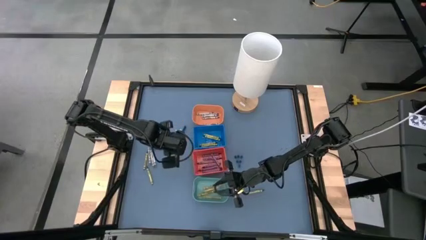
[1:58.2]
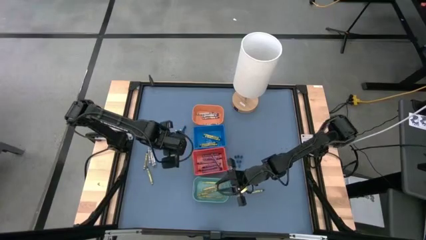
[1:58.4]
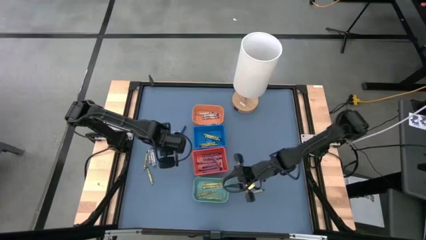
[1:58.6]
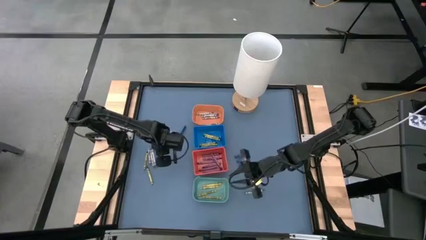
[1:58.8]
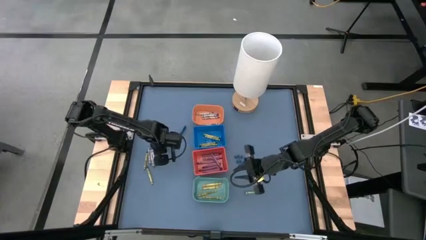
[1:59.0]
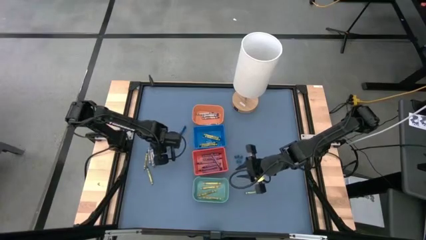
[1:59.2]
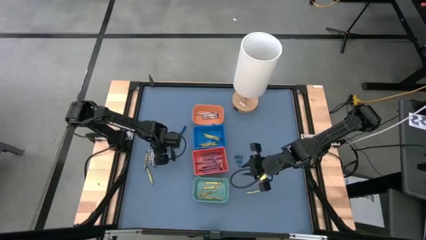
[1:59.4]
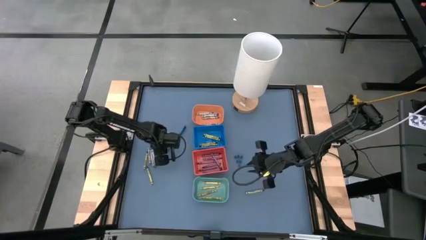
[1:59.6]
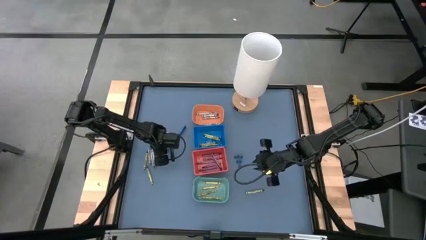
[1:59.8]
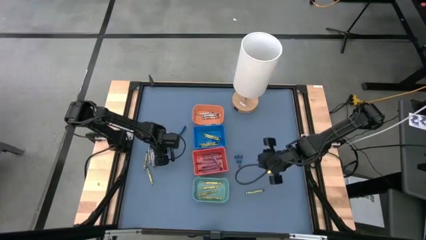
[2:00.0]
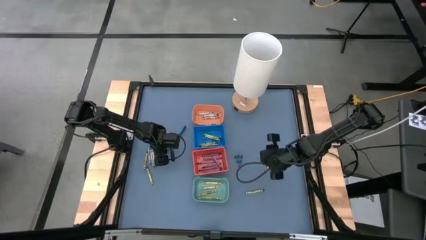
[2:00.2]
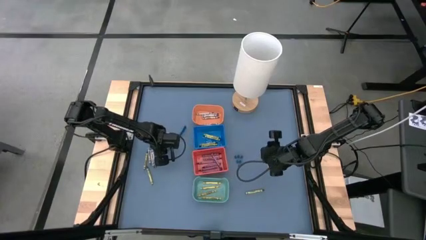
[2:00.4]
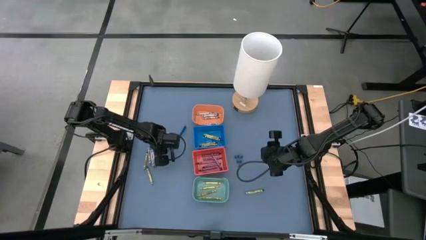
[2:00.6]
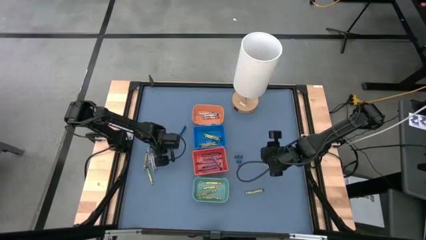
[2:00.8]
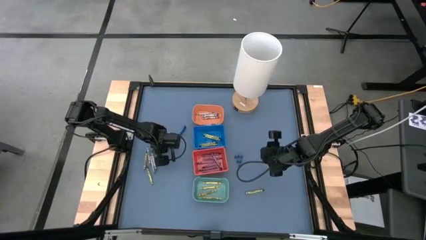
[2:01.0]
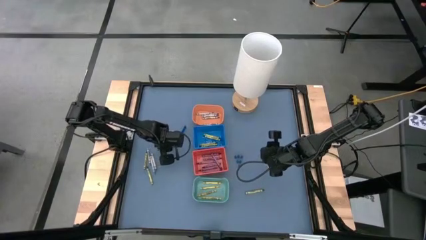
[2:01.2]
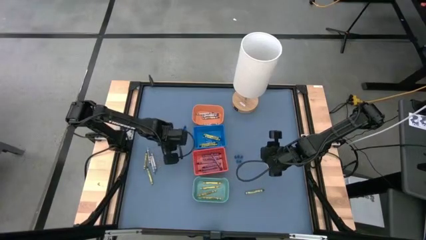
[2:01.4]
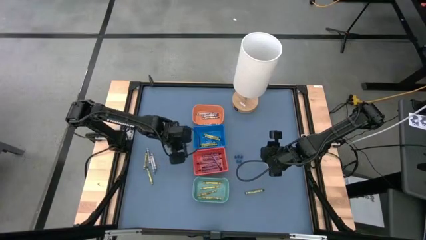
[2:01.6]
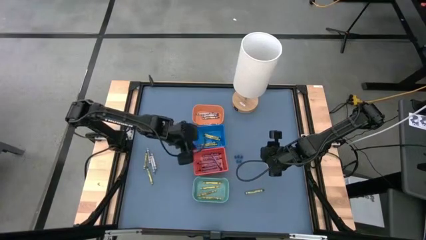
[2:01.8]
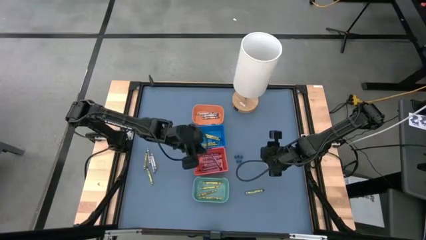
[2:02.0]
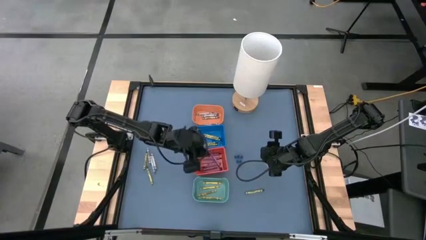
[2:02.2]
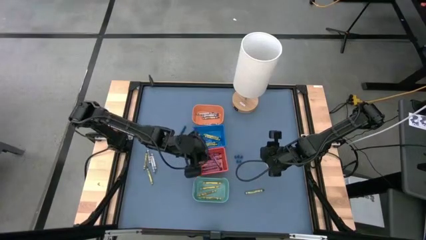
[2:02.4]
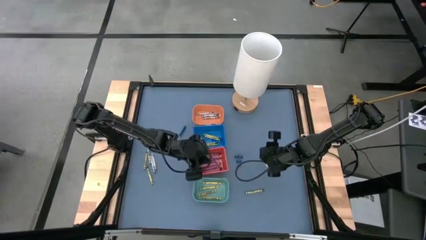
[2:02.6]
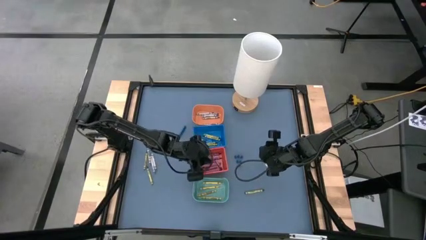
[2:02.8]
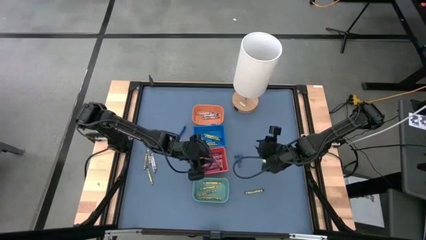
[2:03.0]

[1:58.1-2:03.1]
Task: Sort crayons
Put the purple crayon into the red bin

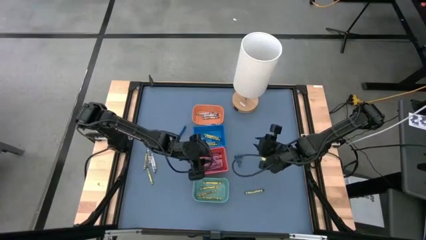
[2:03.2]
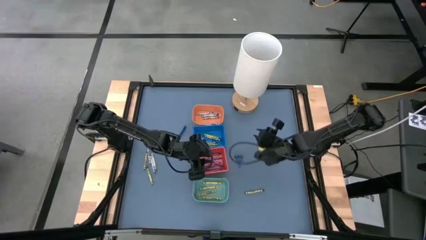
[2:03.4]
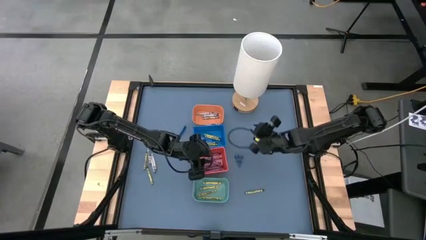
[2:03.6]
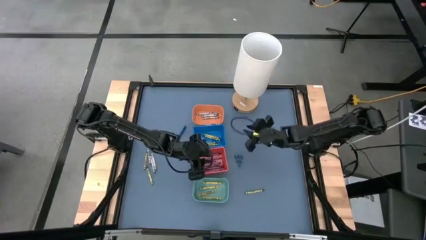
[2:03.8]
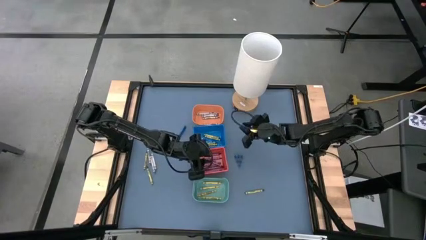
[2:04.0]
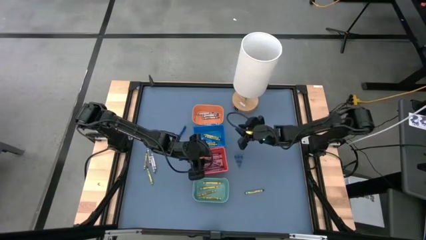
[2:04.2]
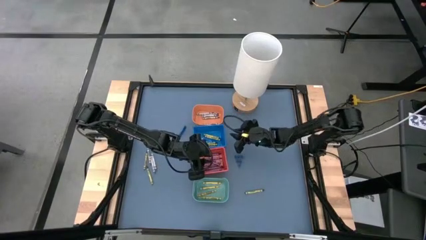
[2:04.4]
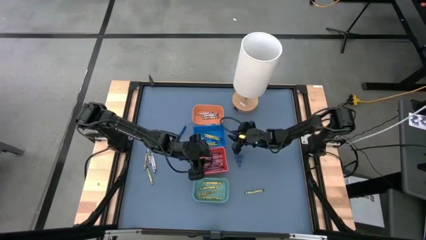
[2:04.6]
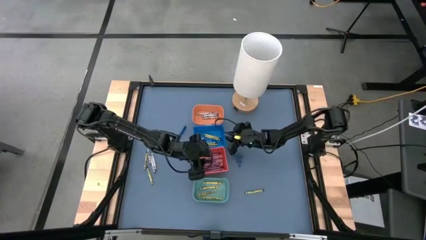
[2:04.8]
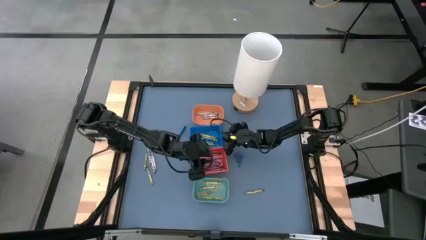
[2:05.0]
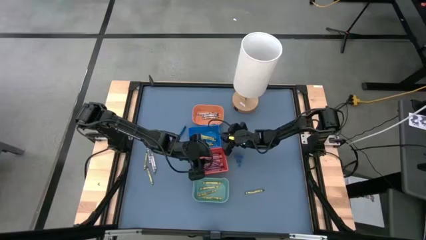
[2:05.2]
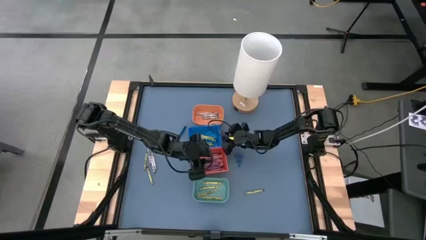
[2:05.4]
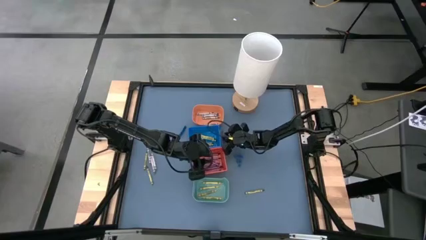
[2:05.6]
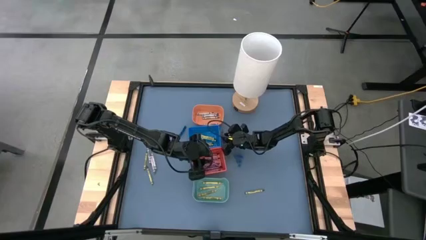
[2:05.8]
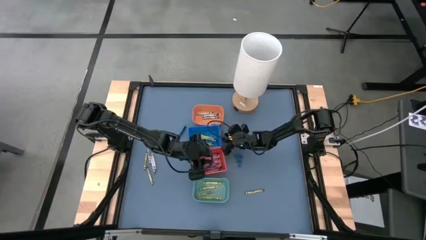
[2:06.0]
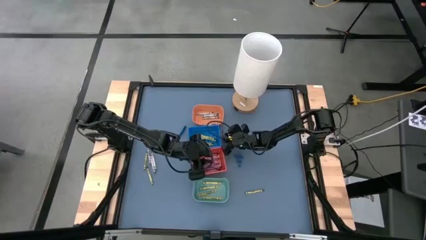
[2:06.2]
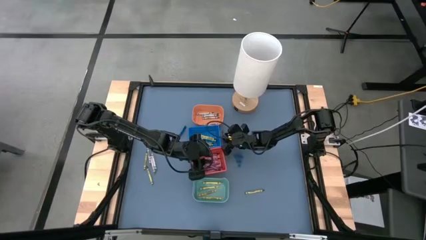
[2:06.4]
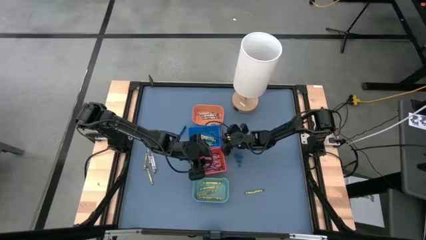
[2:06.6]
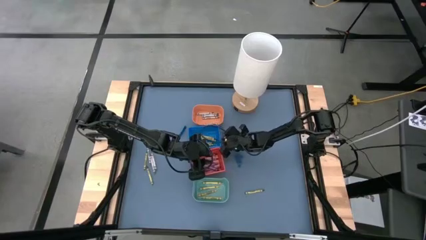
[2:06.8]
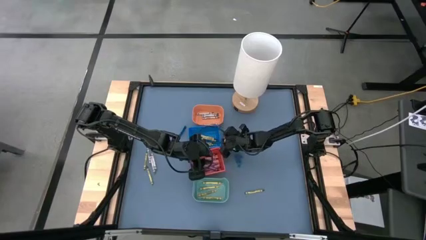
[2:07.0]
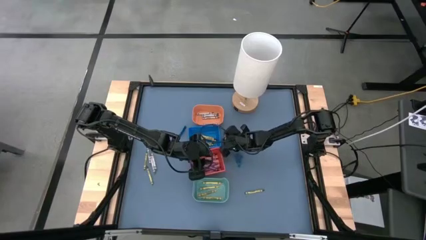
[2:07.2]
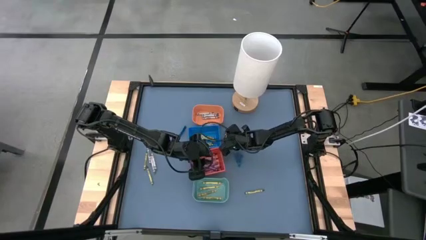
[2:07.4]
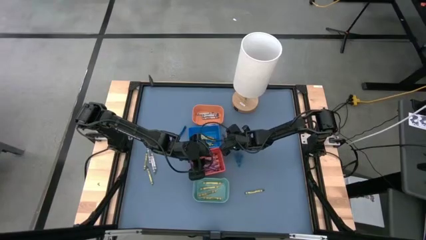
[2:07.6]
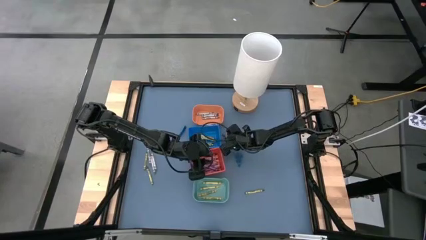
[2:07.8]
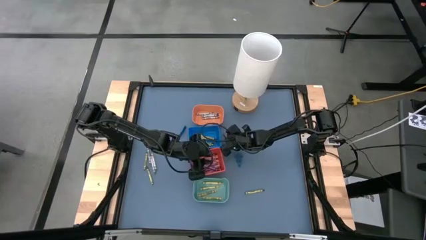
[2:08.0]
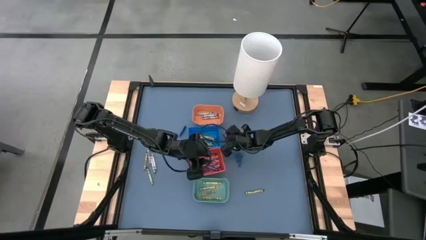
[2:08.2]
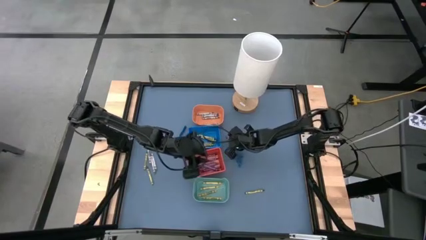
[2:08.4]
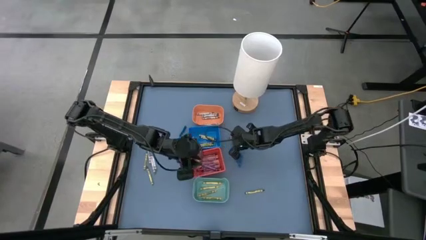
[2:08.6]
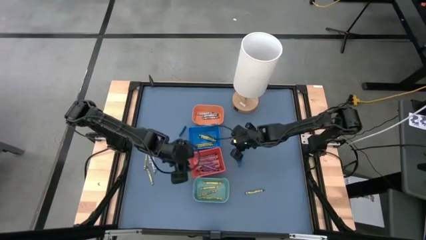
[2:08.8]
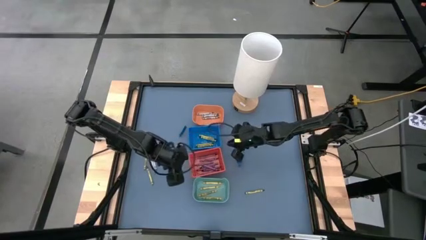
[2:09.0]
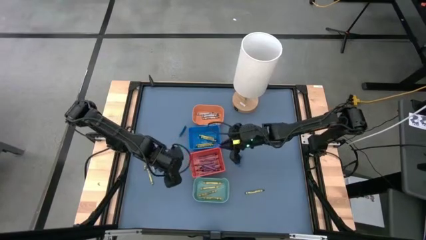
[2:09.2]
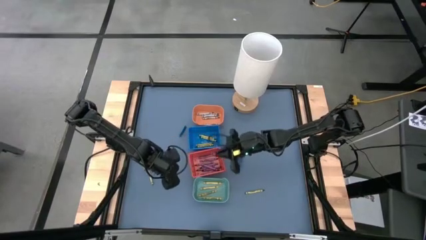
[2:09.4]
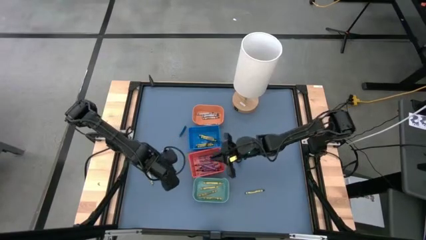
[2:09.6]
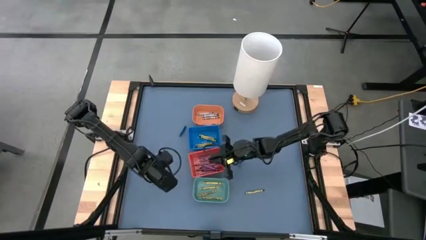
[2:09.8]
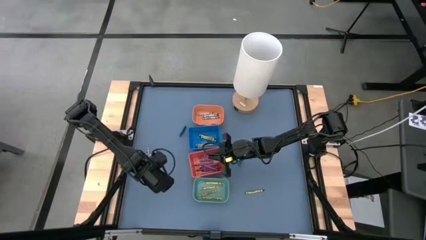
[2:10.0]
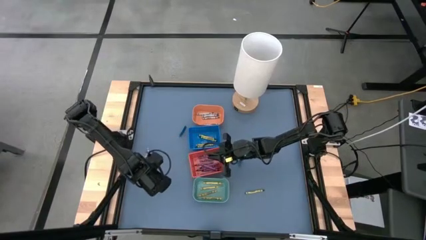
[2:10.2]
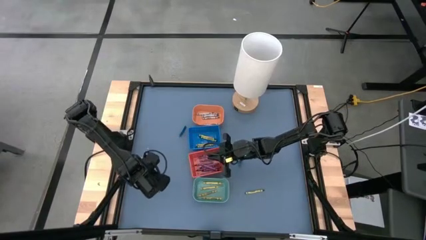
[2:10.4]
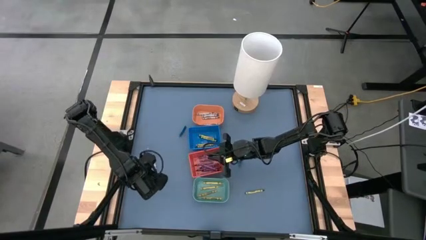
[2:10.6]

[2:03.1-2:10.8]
Put the purple crayon into the red bin

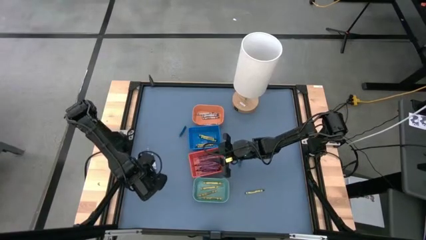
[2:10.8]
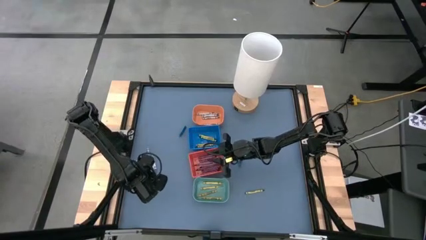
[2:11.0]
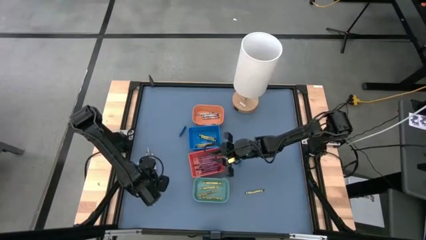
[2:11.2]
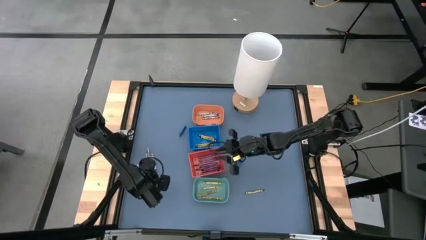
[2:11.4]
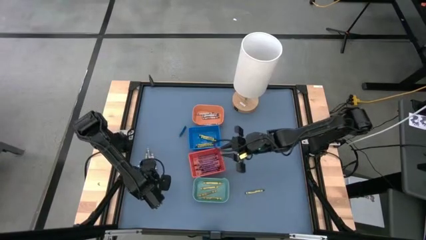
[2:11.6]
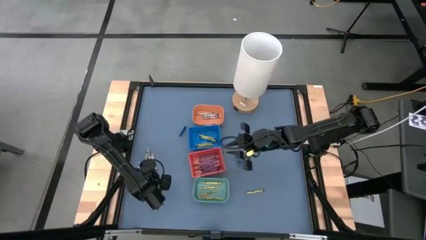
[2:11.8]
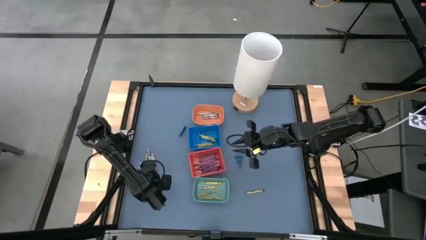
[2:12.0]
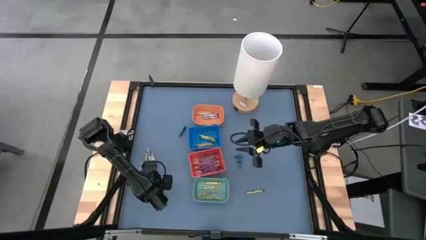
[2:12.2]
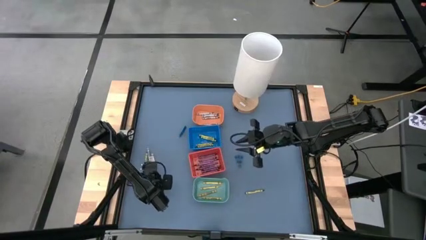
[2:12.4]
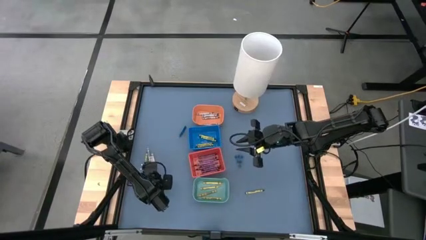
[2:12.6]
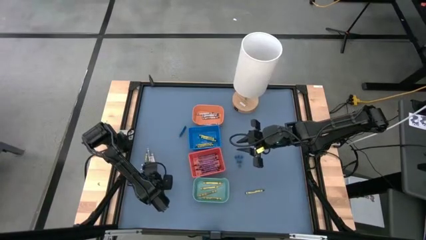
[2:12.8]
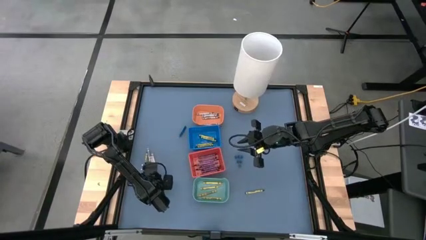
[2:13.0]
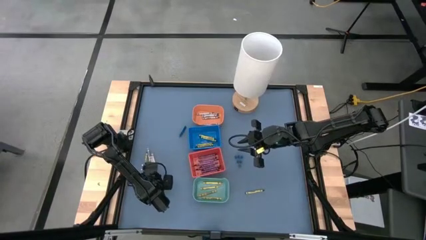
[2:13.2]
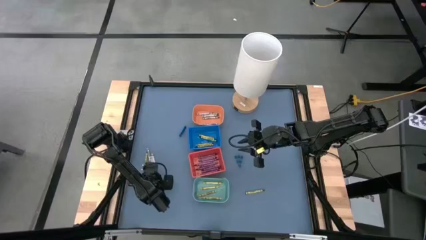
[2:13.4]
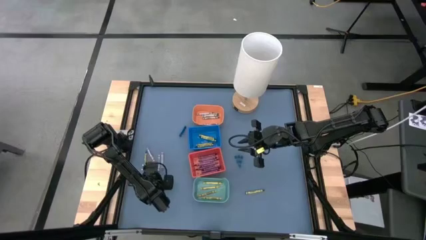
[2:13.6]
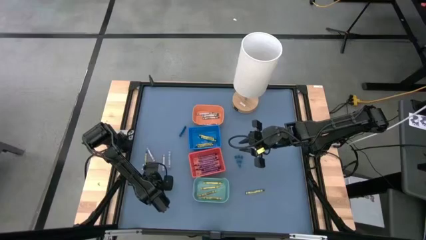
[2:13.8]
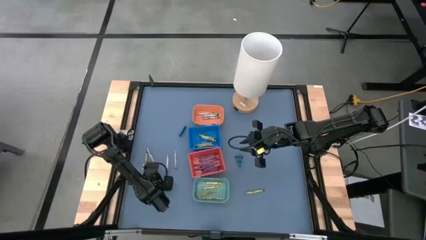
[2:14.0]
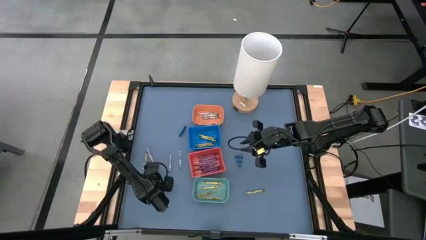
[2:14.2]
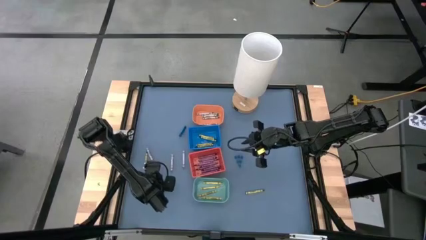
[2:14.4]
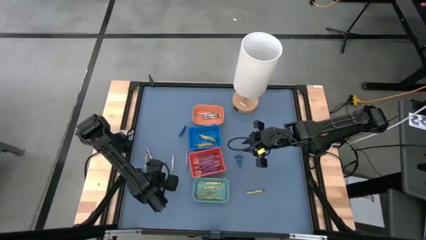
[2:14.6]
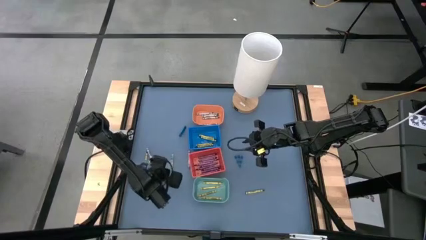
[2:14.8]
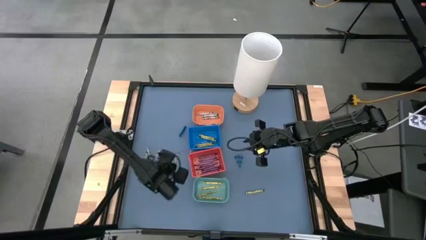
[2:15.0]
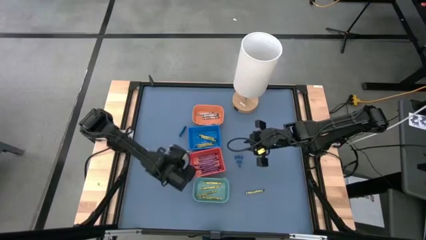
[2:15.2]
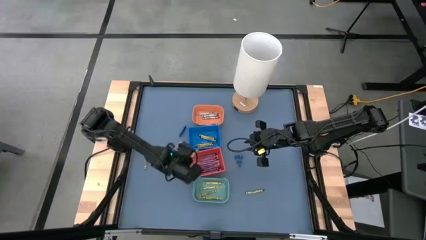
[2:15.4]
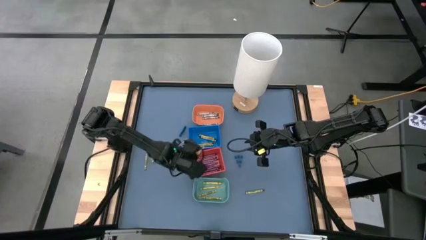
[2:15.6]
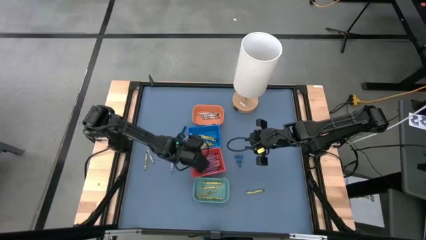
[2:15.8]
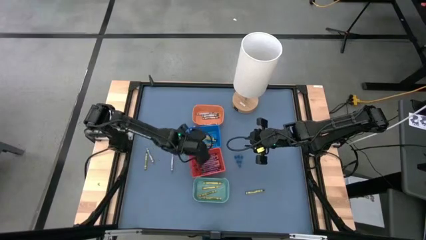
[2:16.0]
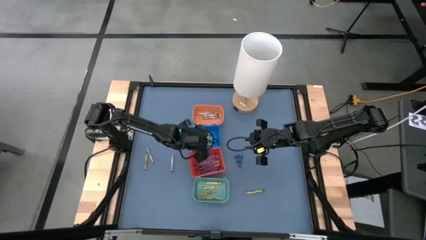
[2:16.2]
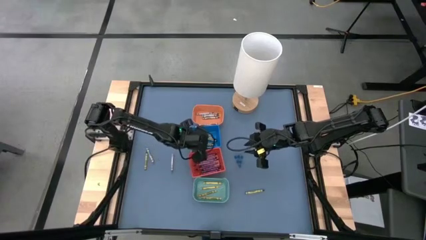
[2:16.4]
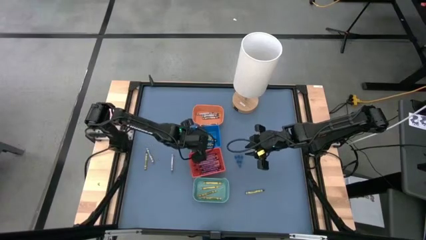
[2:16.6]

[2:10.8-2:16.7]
Put the green crayon into the blue bin
